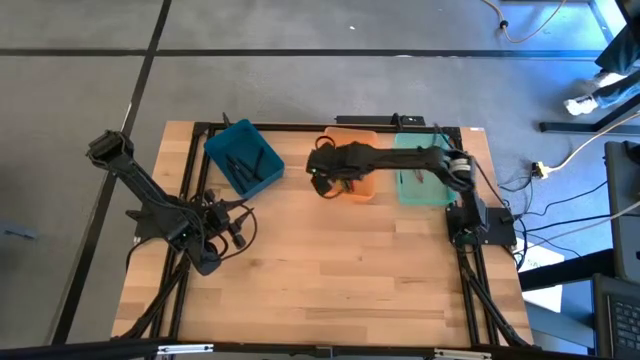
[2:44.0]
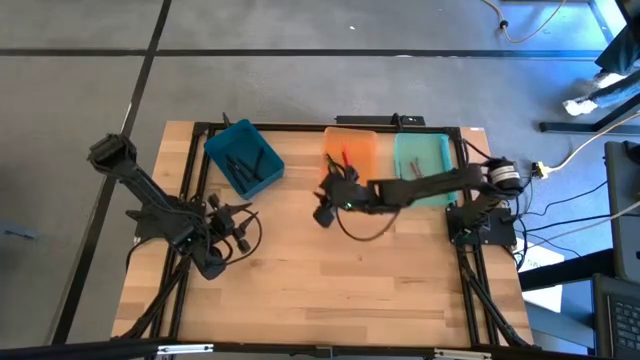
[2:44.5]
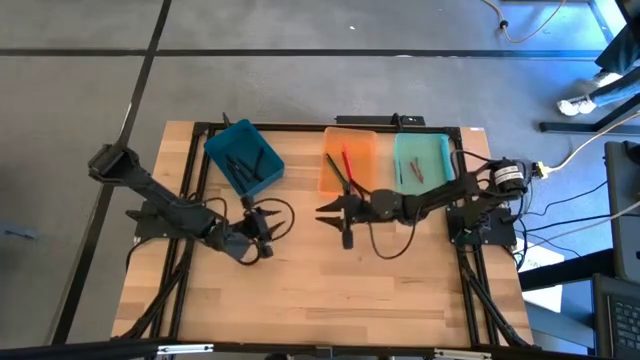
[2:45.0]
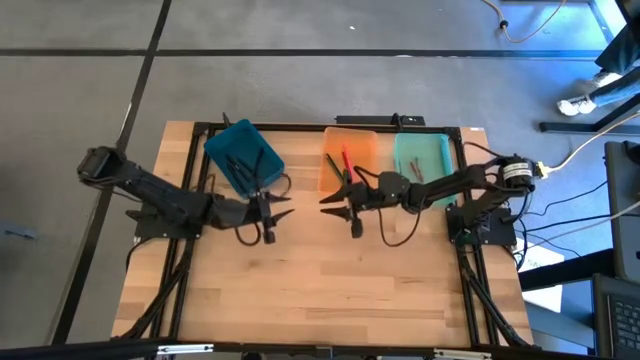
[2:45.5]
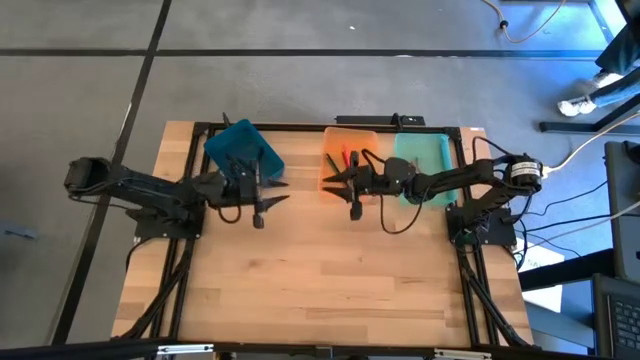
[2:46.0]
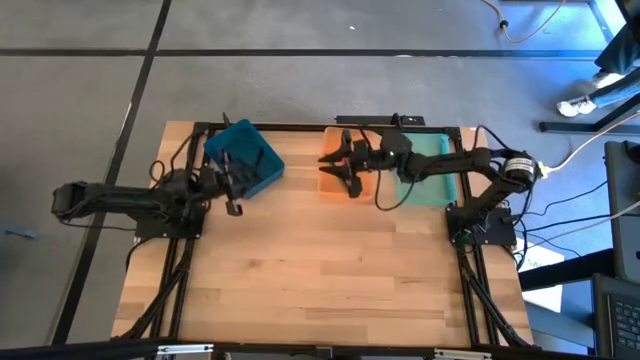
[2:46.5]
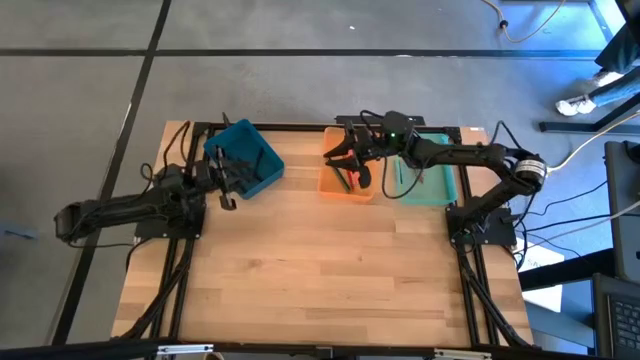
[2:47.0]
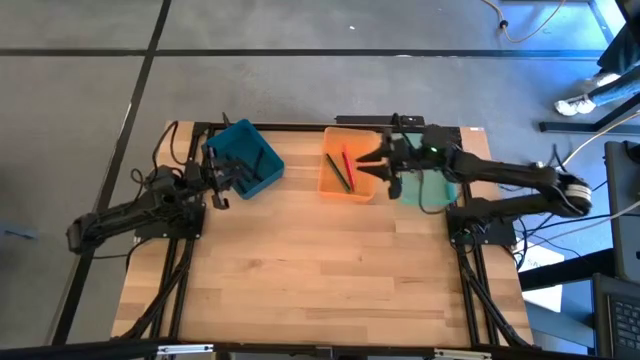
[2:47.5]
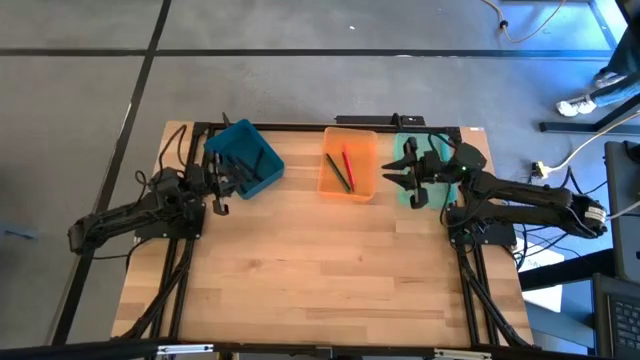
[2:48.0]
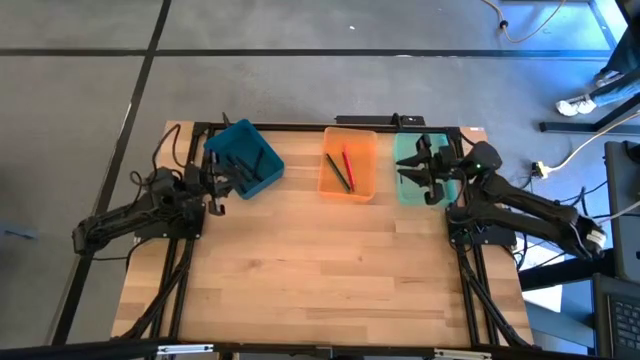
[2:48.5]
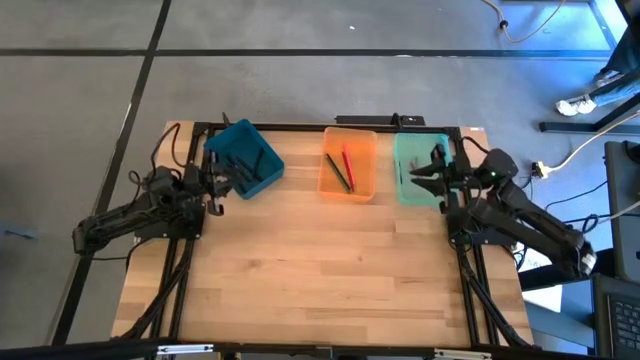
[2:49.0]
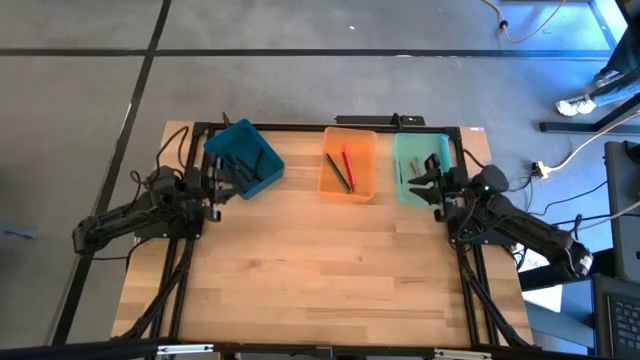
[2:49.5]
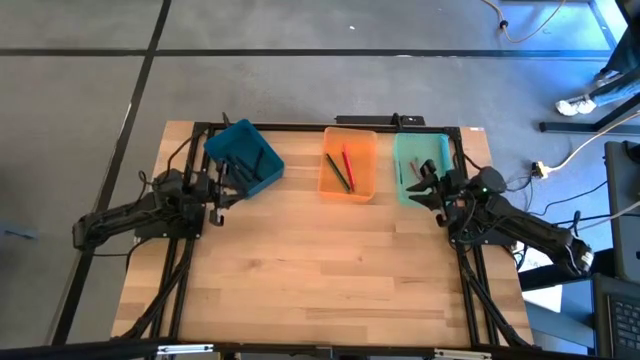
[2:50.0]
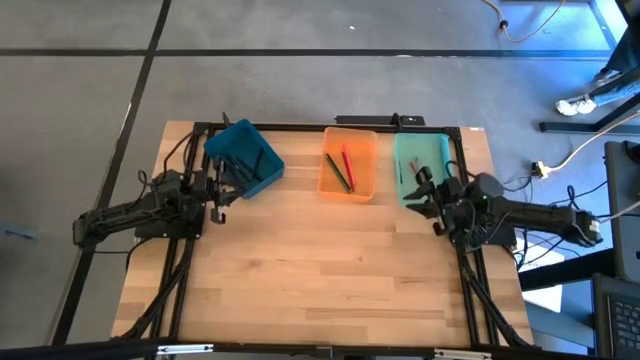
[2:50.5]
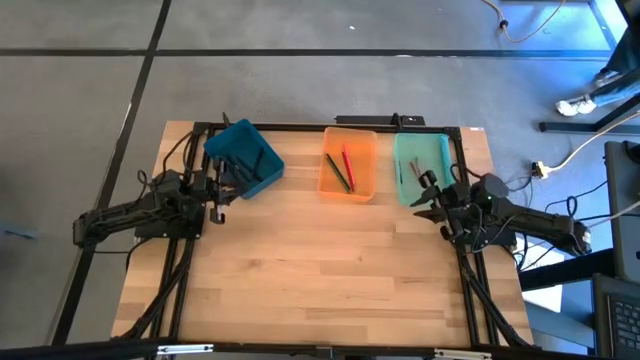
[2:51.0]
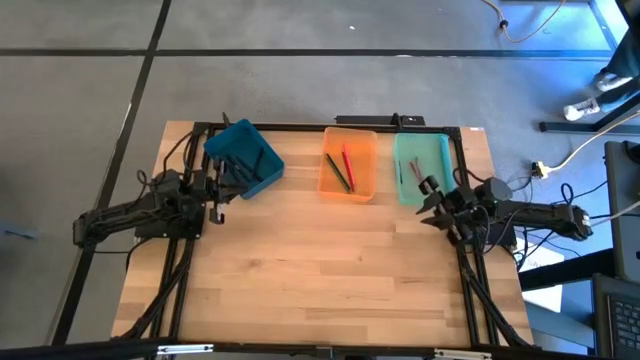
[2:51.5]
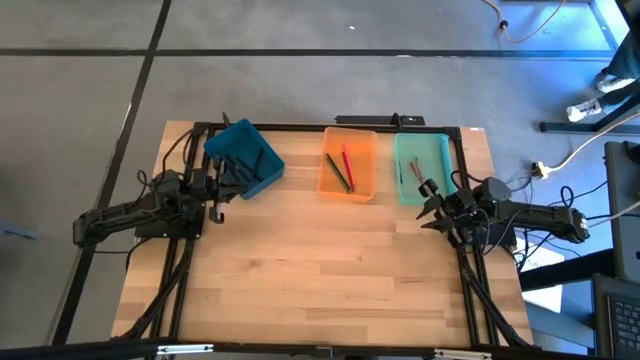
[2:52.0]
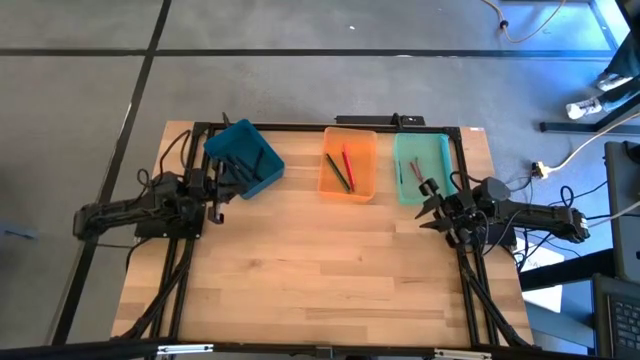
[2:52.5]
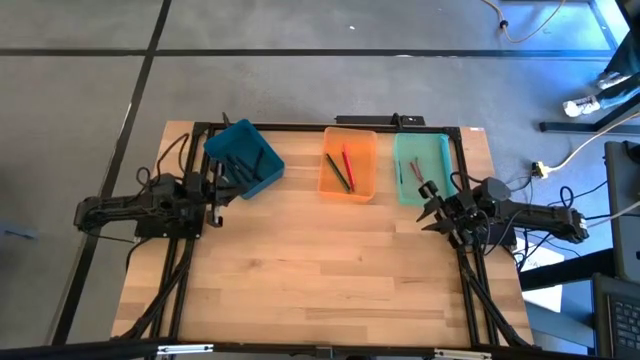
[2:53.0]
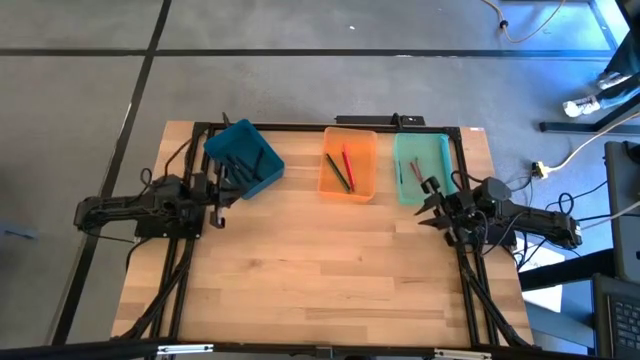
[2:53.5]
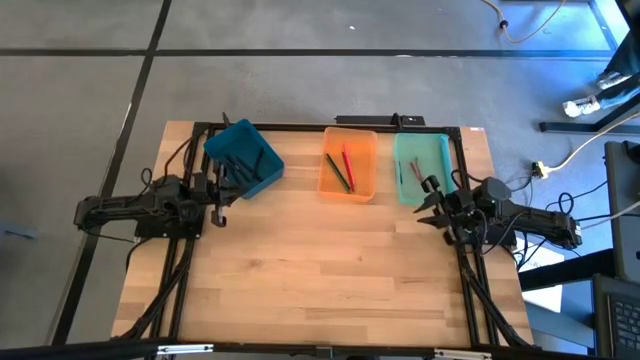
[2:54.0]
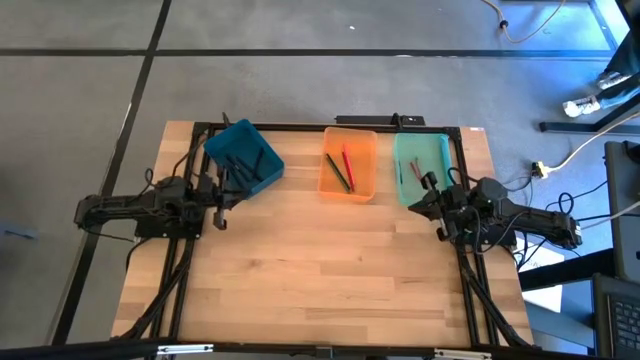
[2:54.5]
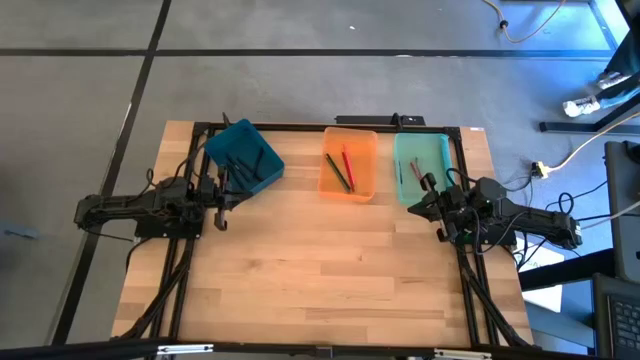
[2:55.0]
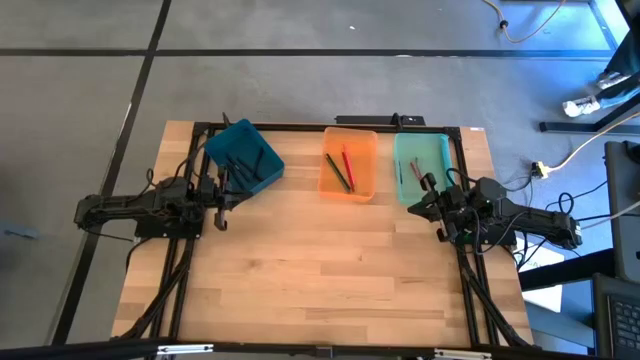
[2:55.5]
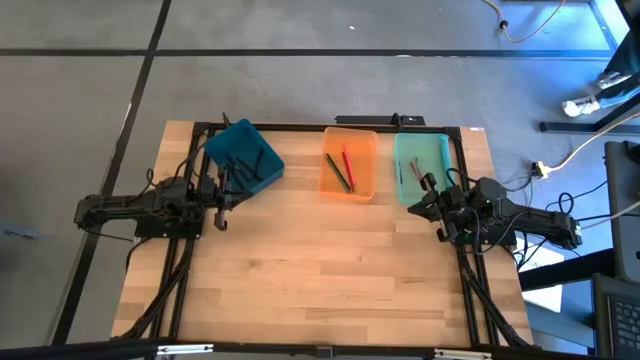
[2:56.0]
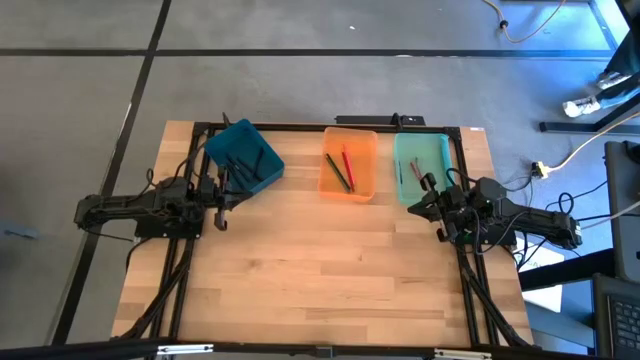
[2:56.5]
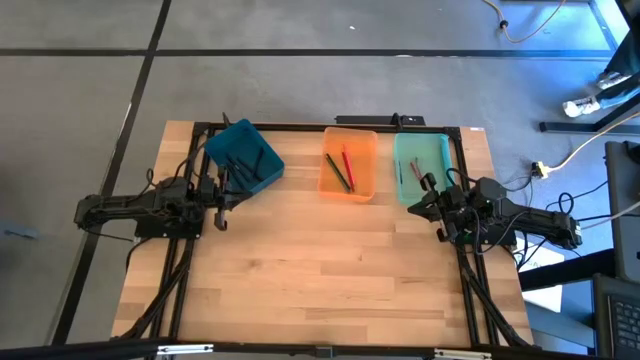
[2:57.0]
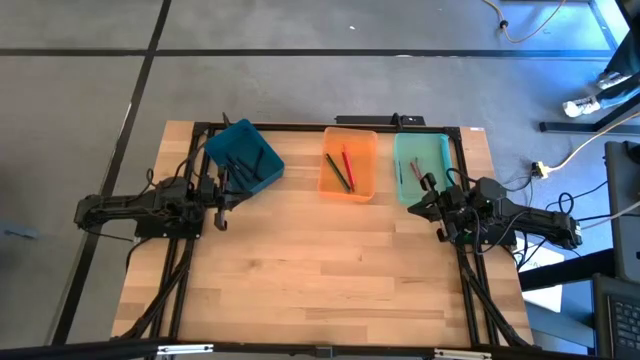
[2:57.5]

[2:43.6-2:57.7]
Task: Sort crayons/erasers/pens/pencils in bins
Return to Home Position

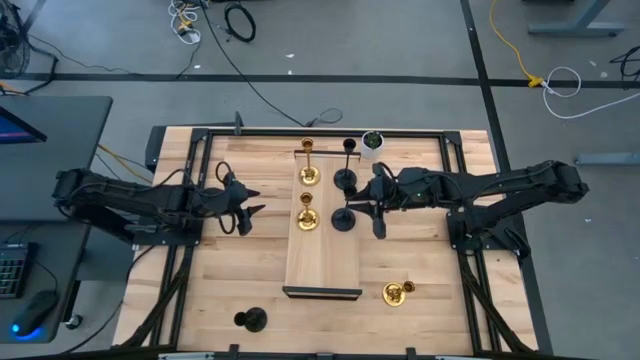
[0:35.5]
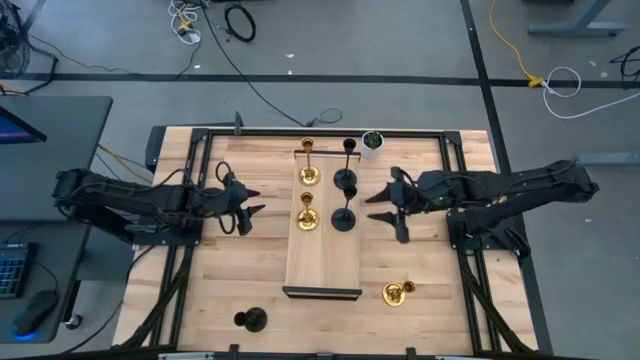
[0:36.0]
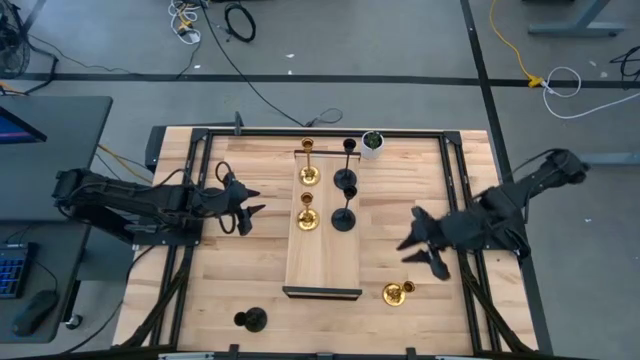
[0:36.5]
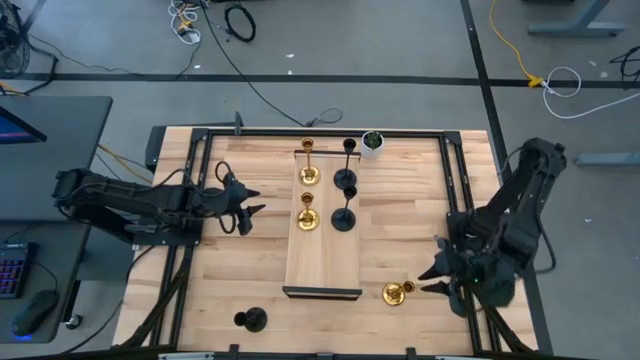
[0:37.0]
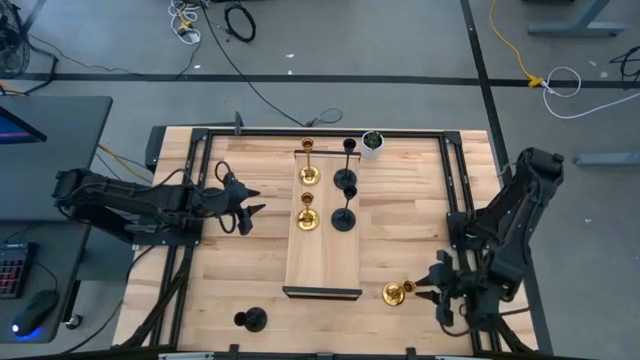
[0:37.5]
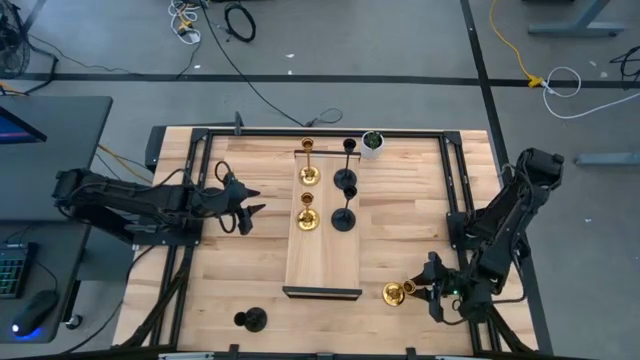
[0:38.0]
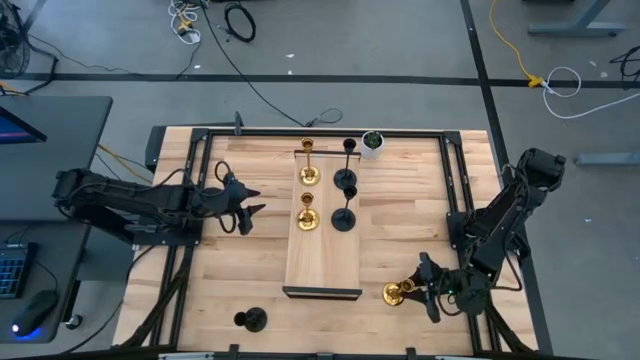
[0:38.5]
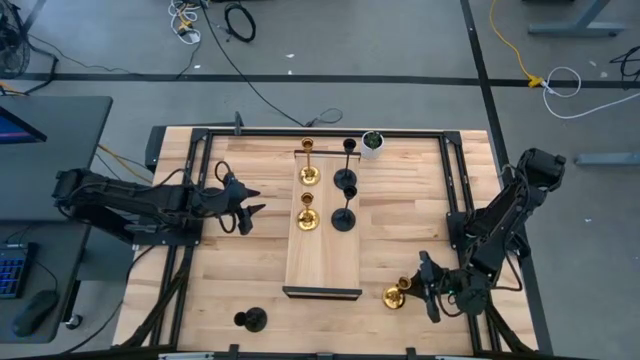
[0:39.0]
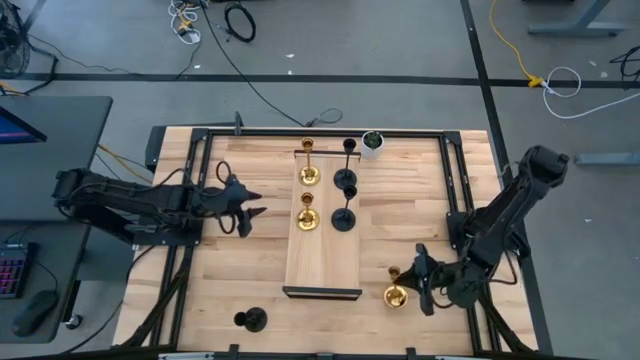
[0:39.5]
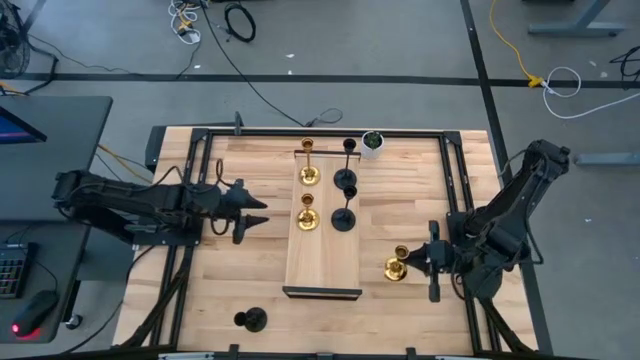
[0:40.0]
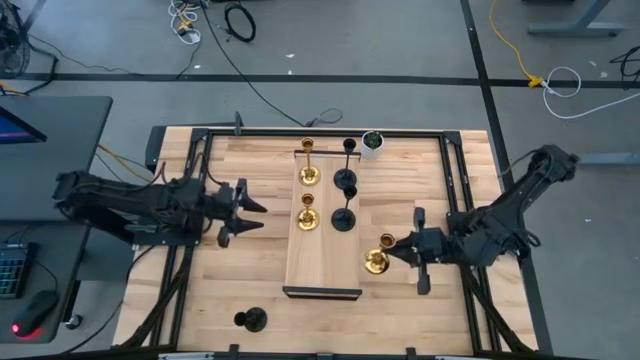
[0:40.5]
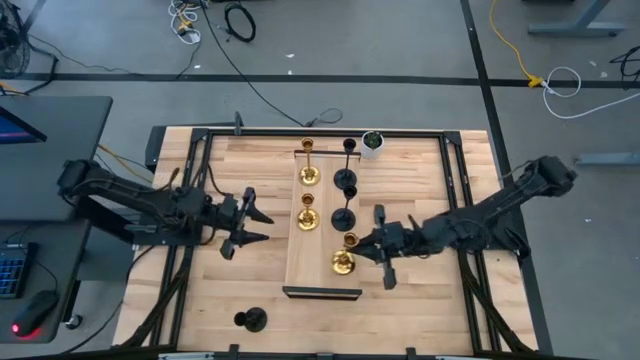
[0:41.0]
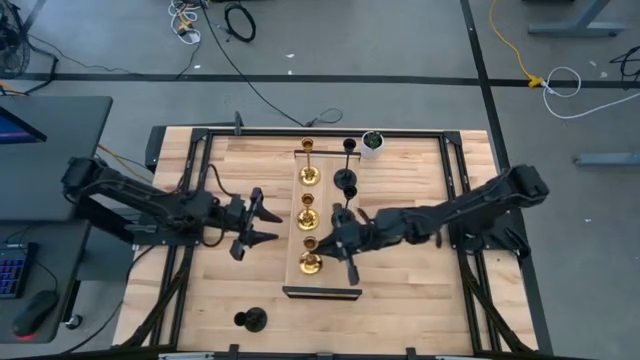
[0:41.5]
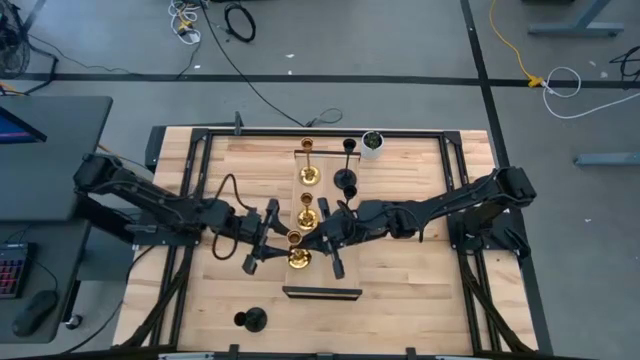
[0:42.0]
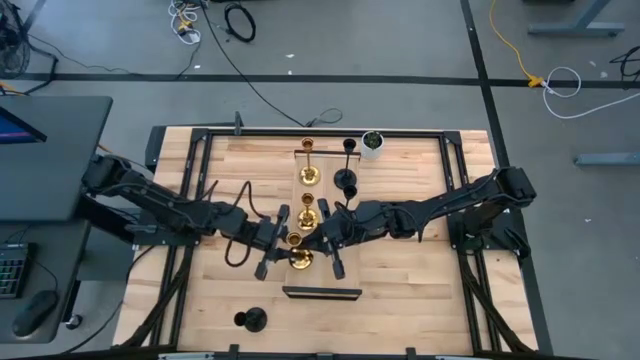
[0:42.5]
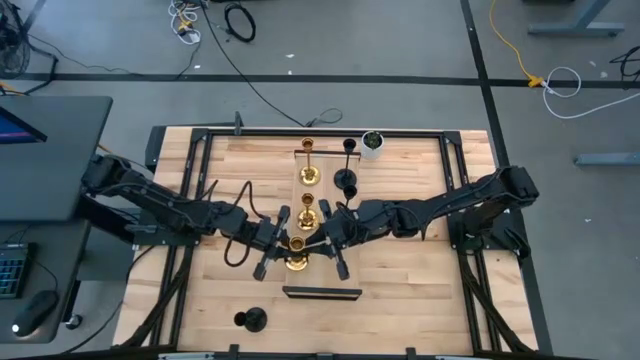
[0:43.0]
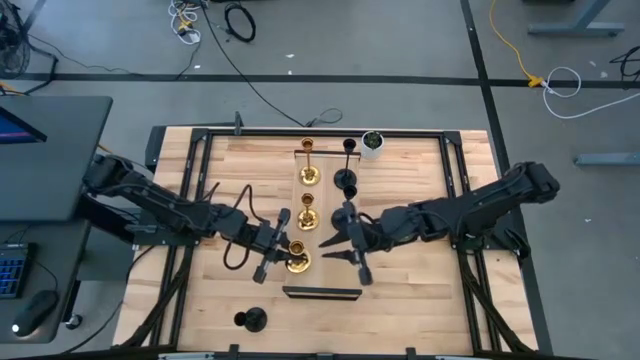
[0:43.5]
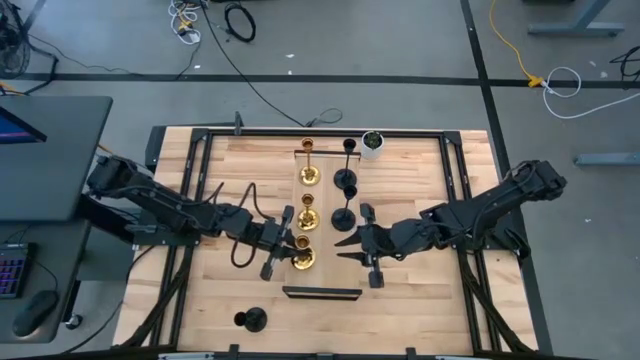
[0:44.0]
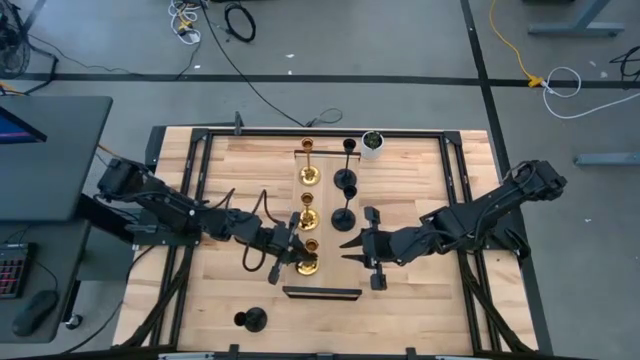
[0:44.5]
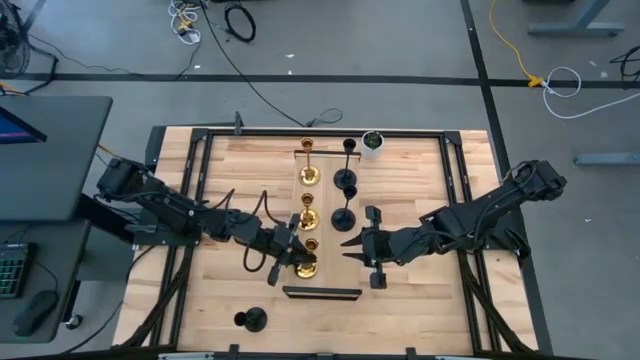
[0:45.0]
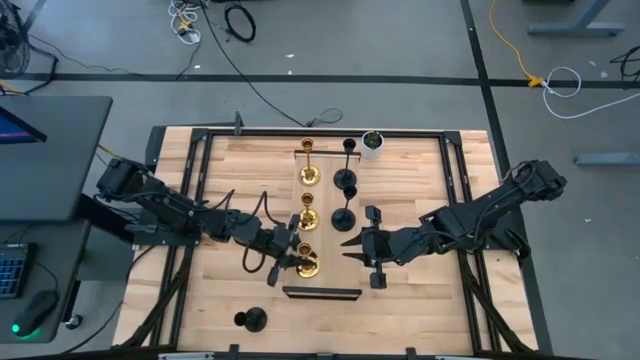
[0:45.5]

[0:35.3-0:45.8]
Task: Pick & Place candle stick holders
Put the gold candle holder on the shelf
